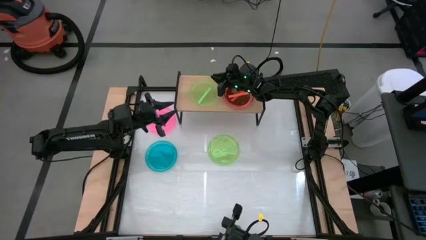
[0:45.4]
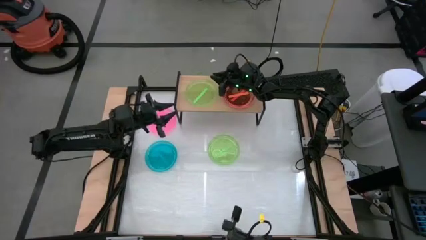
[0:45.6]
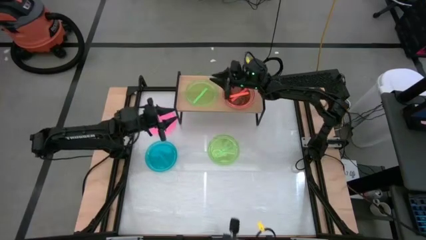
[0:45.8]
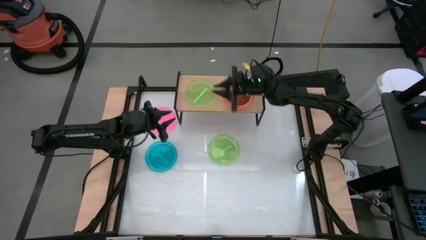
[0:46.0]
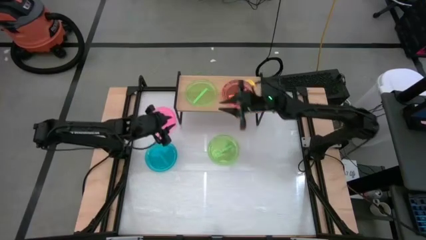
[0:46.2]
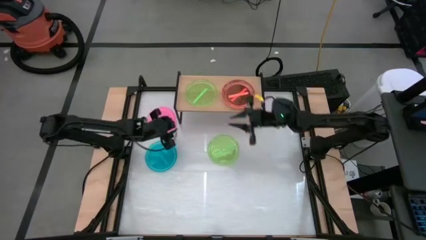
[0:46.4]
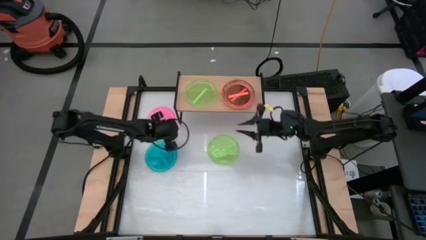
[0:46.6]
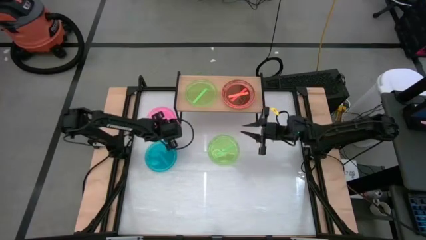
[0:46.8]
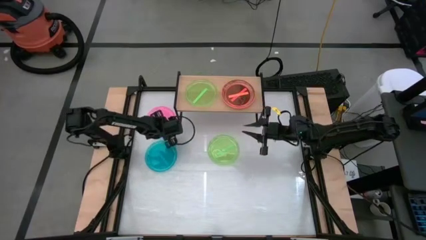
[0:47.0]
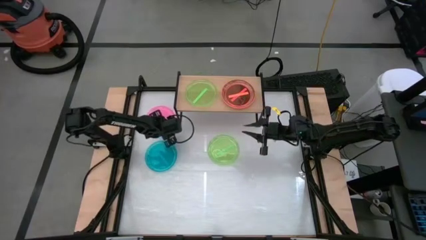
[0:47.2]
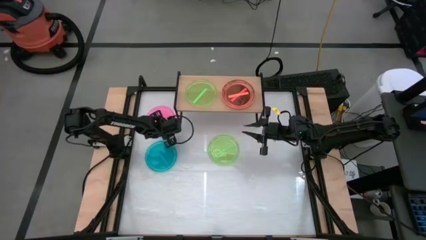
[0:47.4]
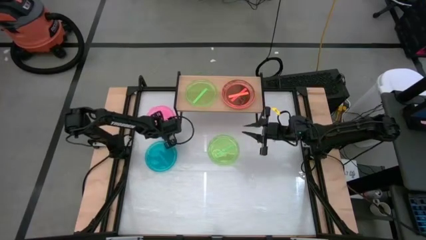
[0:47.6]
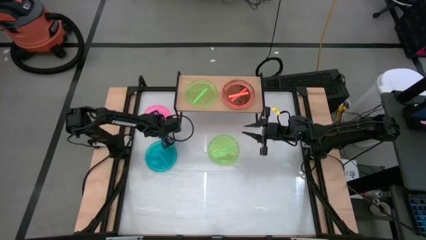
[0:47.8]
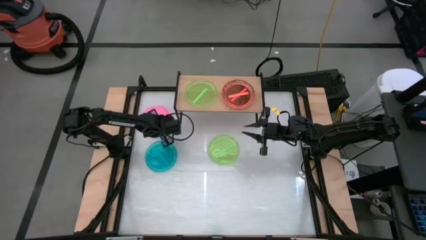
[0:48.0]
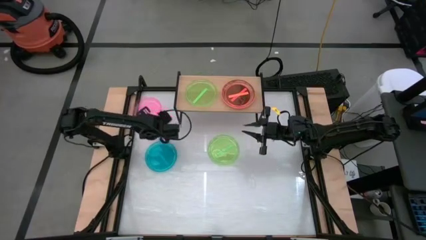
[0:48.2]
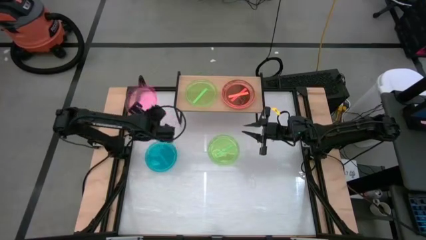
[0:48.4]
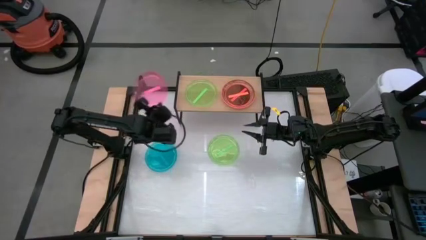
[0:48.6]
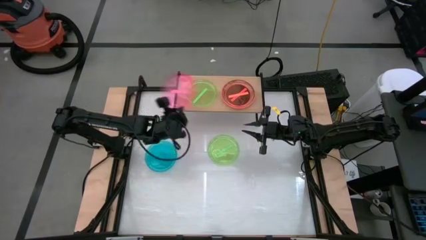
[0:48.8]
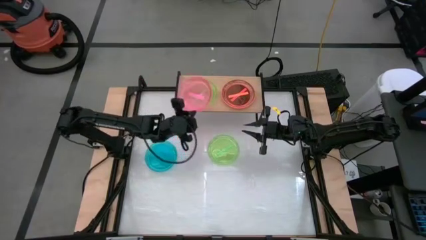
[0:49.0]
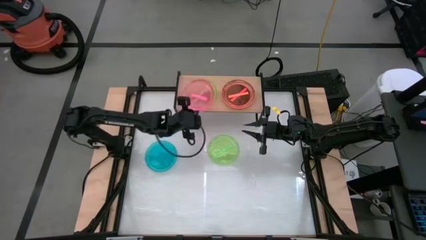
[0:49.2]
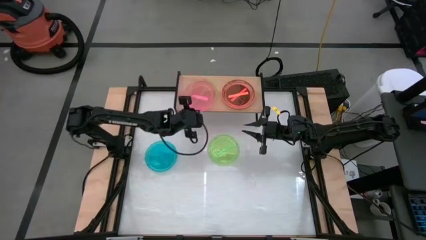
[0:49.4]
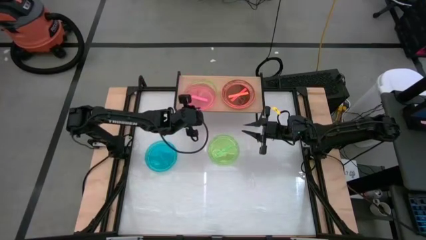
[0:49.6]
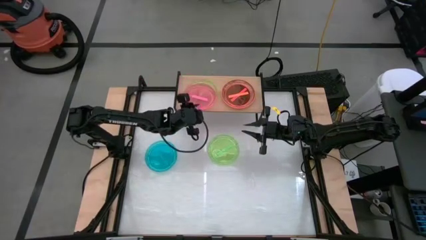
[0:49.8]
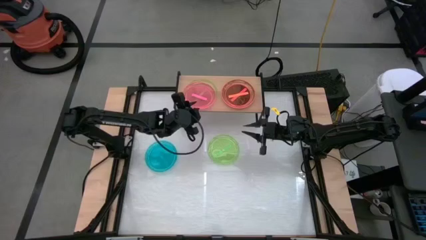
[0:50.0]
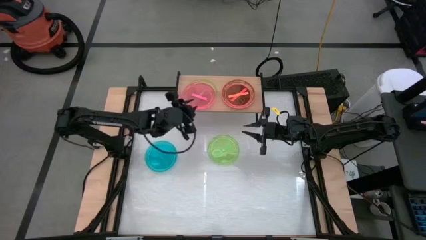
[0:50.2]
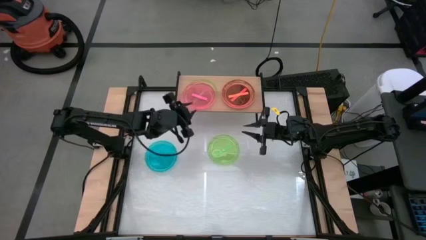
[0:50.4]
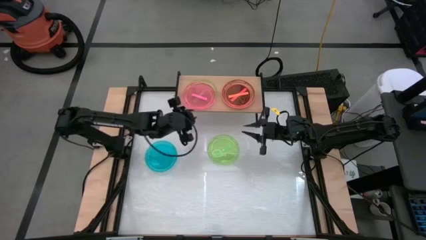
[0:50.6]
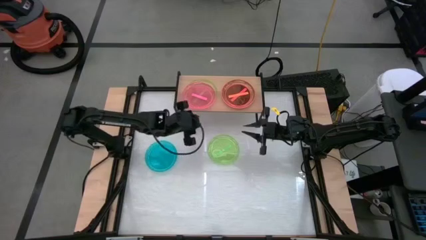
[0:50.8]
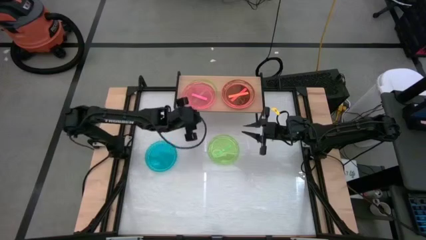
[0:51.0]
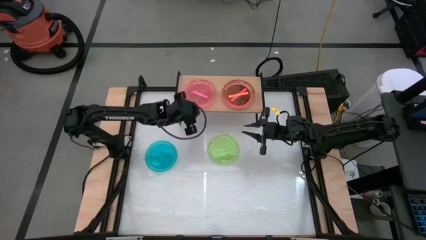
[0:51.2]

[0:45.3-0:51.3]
Task: Place and stack plates onto a shelf
Stack the pink plate on top of the green plate on the shelf

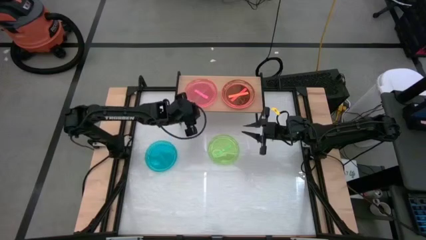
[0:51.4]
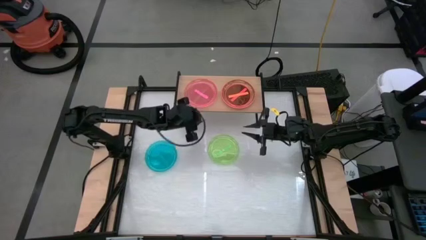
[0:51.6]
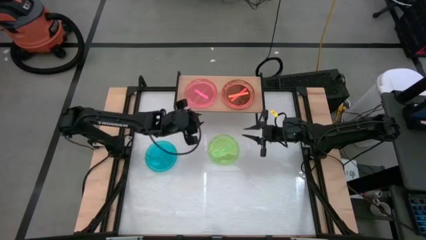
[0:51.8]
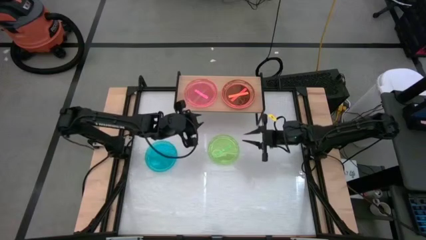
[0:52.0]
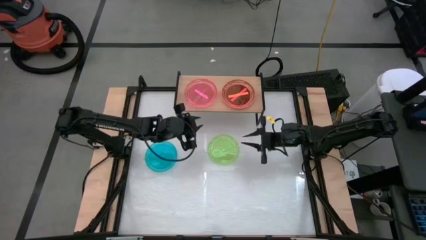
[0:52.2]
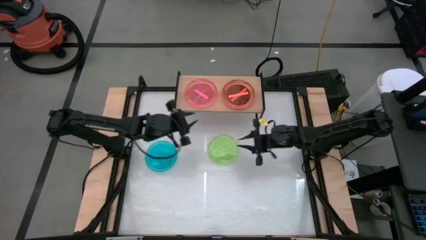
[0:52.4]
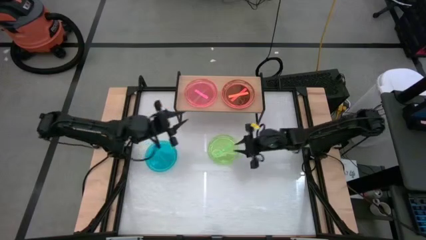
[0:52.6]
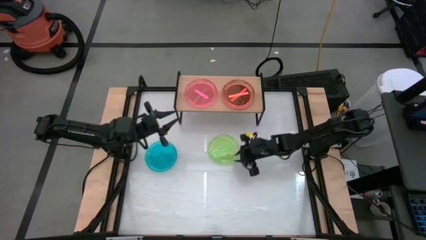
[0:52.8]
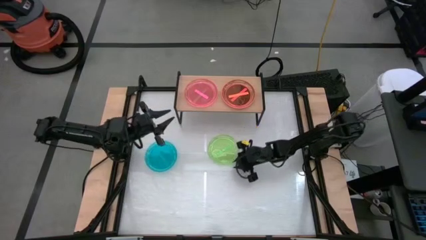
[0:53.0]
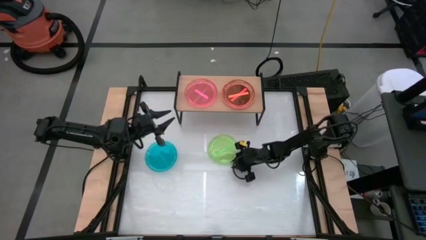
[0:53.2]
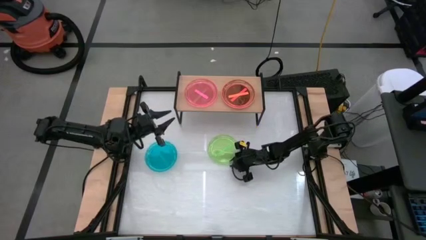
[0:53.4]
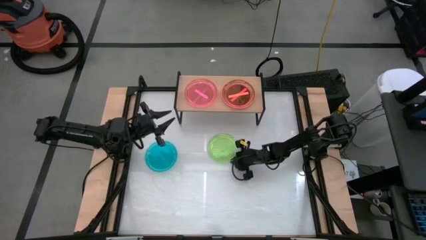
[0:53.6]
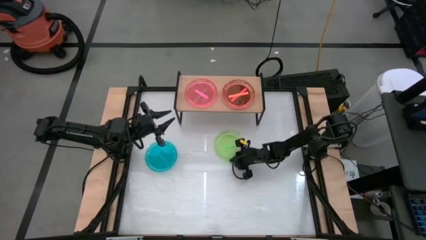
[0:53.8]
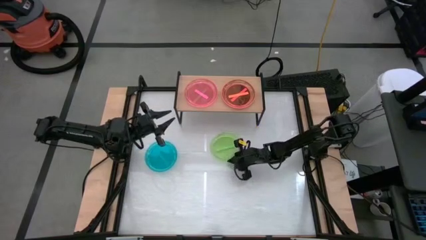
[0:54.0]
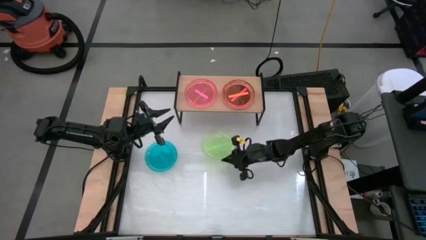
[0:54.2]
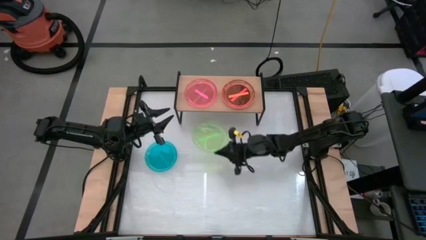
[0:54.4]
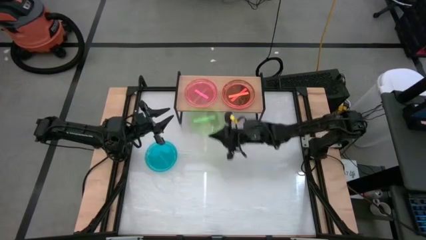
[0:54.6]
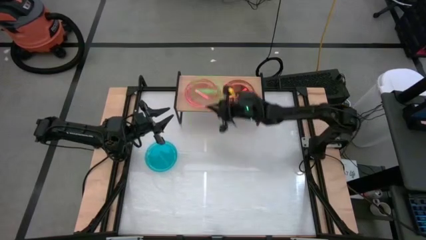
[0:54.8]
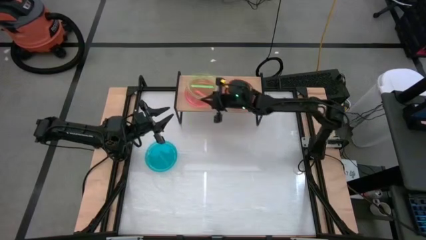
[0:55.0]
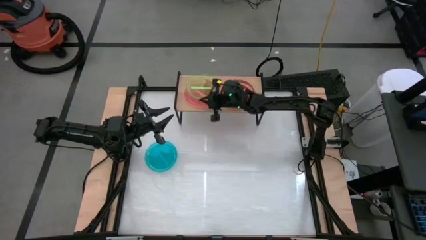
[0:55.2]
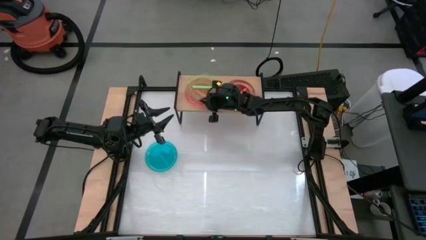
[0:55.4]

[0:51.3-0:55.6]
Stack the green plate on top of the pink plate on the shelf

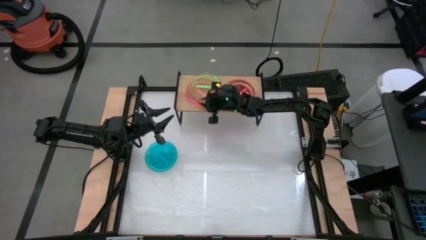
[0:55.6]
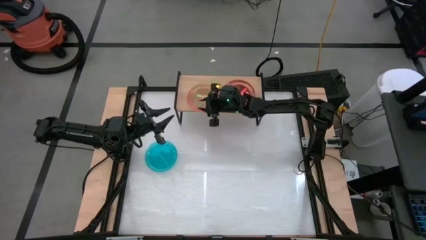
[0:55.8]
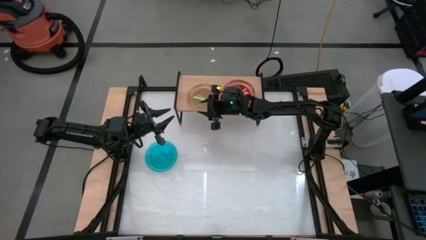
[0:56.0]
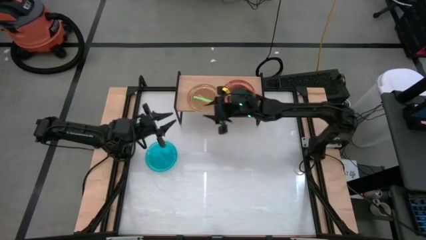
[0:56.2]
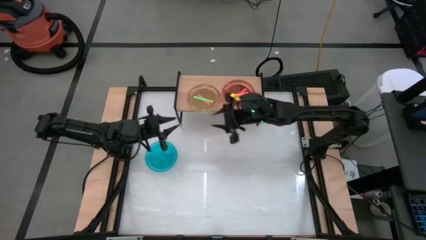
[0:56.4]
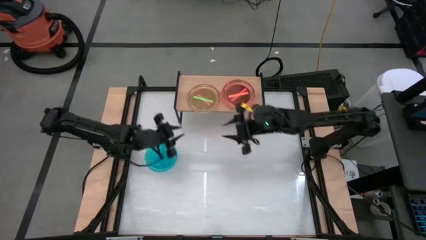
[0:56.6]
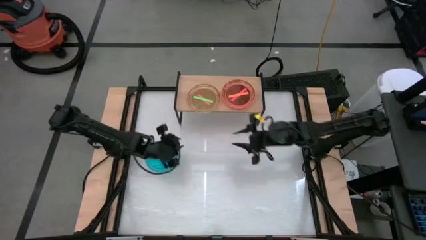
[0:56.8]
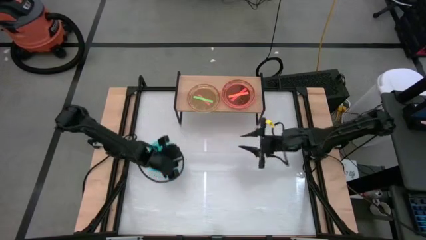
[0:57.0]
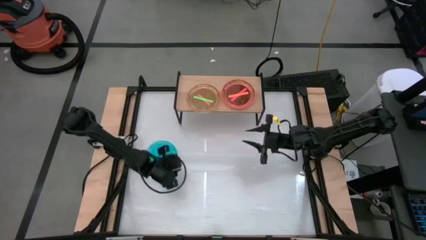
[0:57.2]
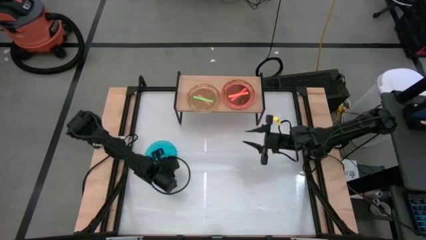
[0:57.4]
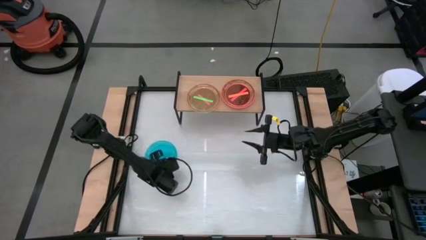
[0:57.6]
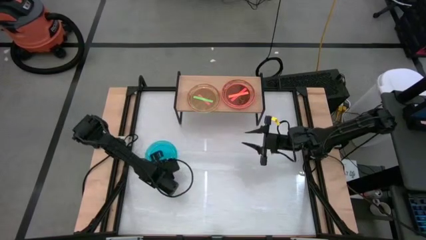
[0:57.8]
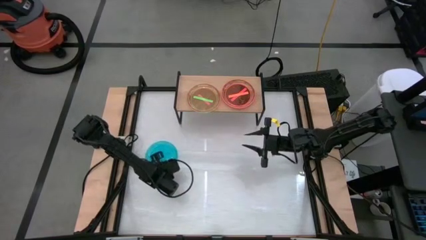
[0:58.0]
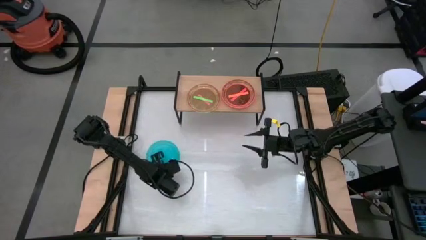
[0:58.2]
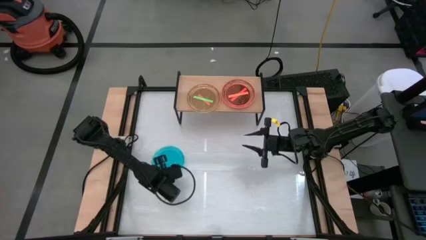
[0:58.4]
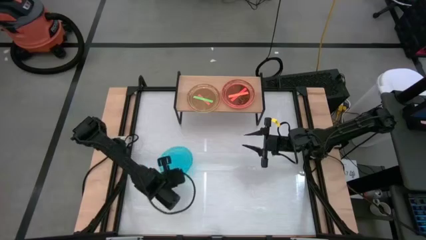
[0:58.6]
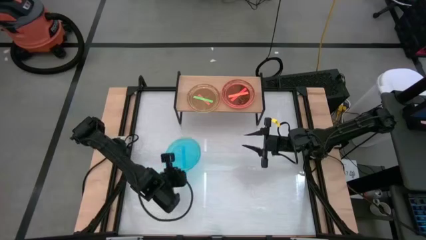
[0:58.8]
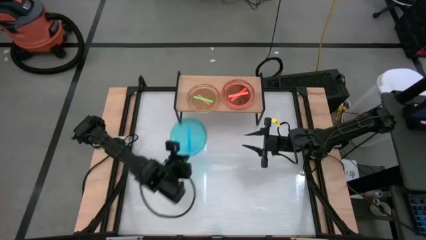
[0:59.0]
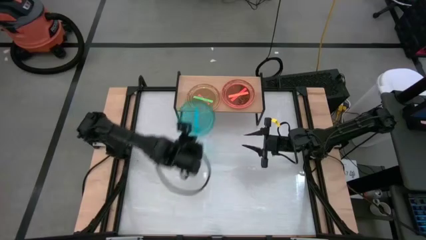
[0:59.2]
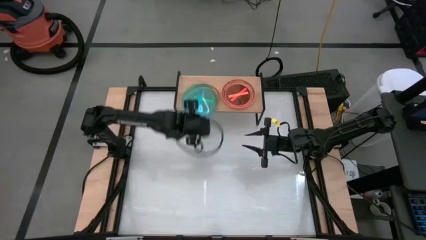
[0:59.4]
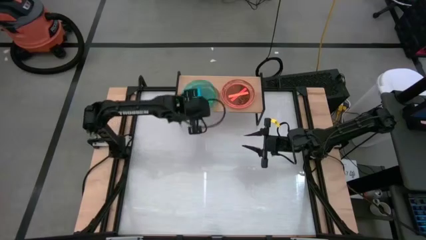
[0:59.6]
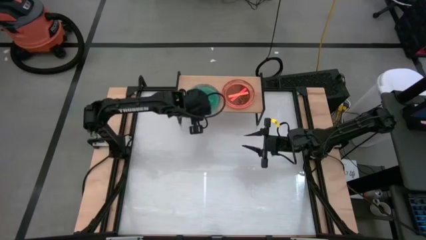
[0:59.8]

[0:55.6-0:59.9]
Stack the blue plate on top of the green plate on the shelf

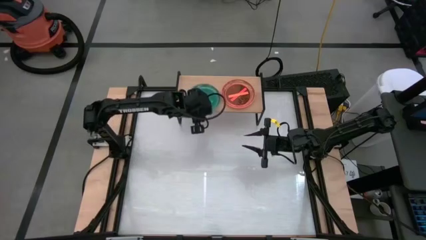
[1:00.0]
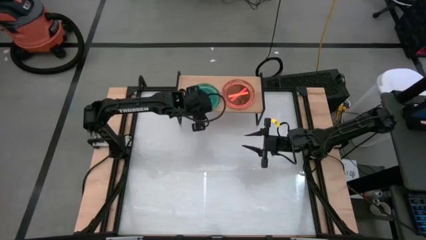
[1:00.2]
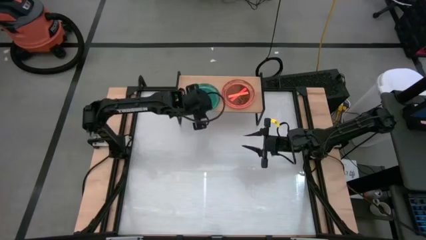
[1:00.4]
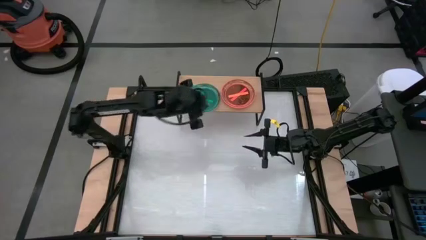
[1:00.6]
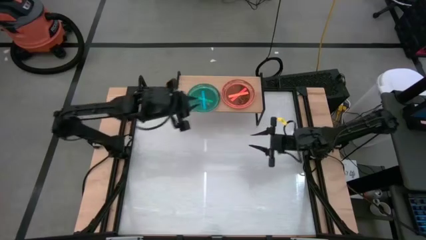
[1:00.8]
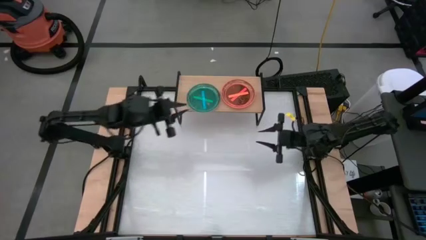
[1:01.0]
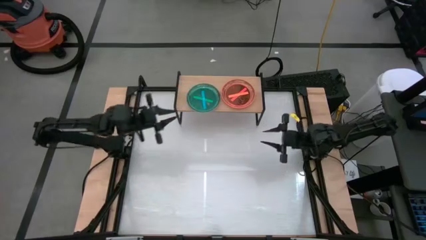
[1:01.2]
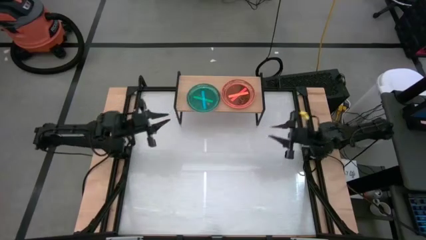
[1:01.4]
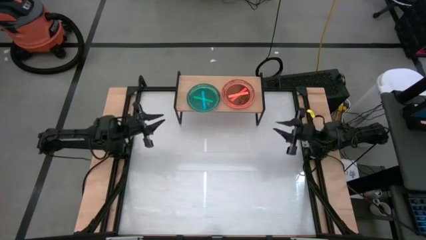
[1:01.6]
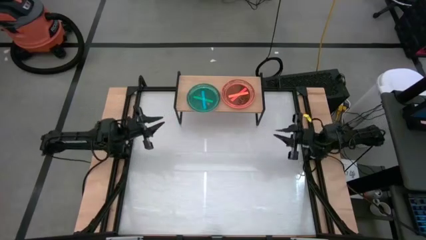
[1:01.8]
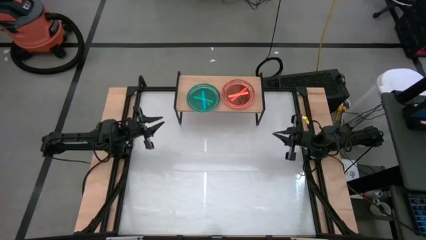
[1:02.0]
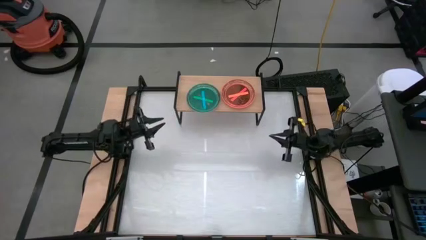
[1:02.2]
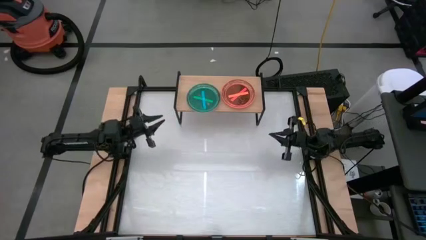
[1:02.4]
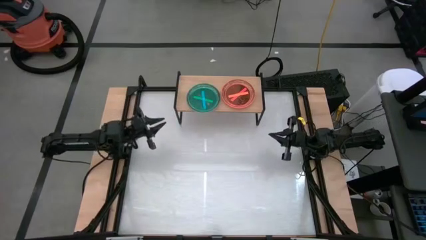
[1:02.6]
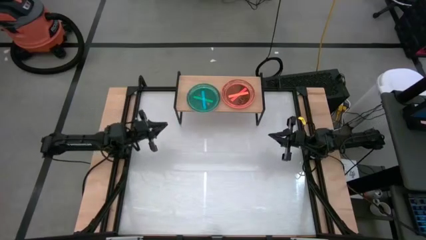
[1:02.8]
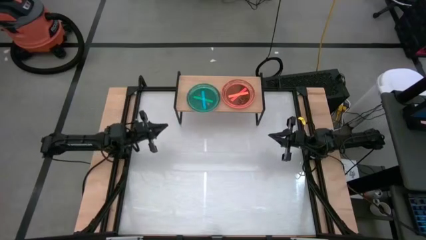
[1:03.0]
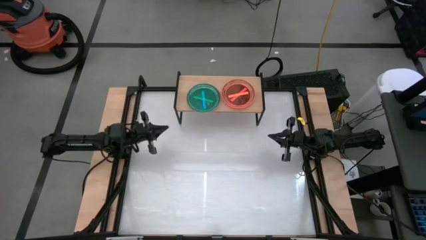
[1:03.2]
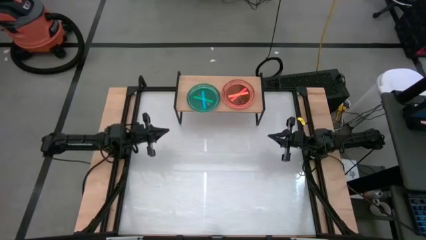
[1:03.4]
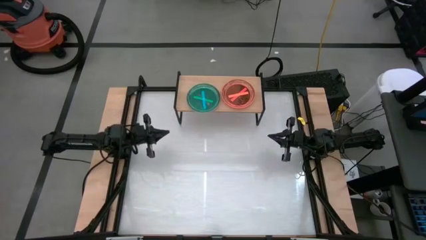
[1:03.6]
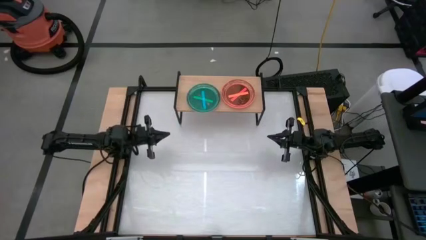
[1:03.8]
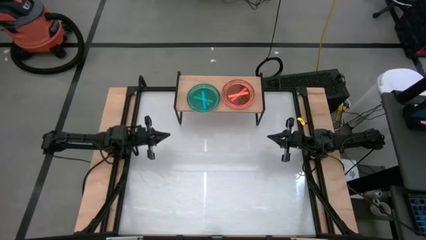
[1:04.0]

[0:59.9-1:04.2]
Return to Home Position
